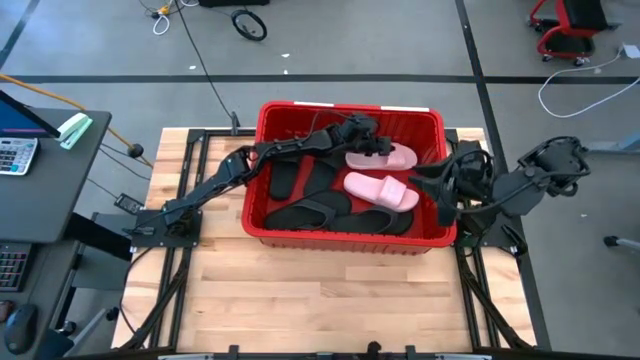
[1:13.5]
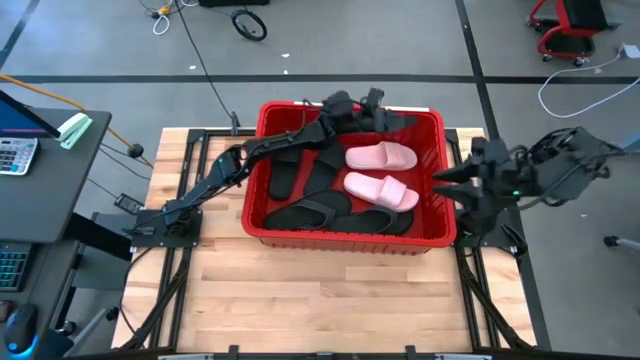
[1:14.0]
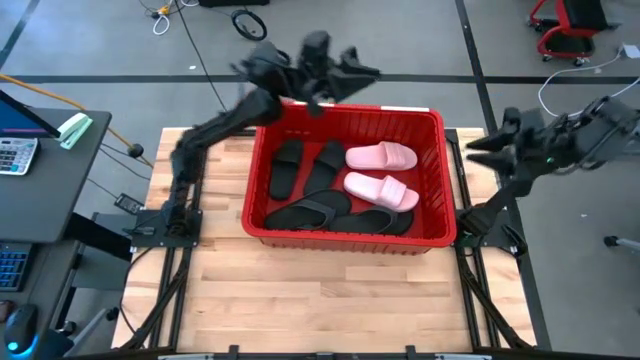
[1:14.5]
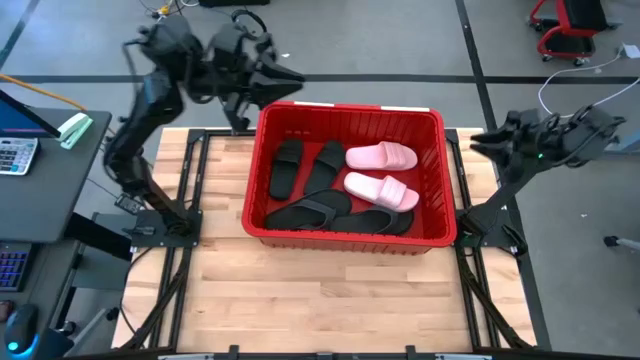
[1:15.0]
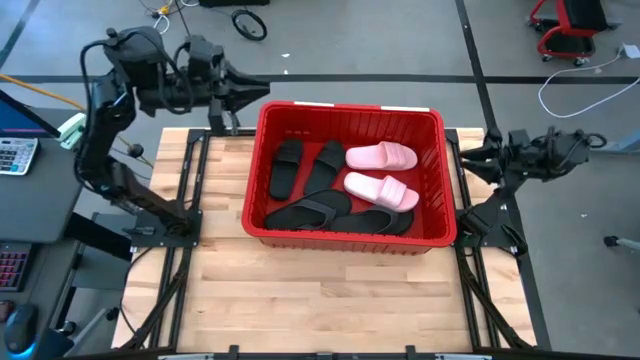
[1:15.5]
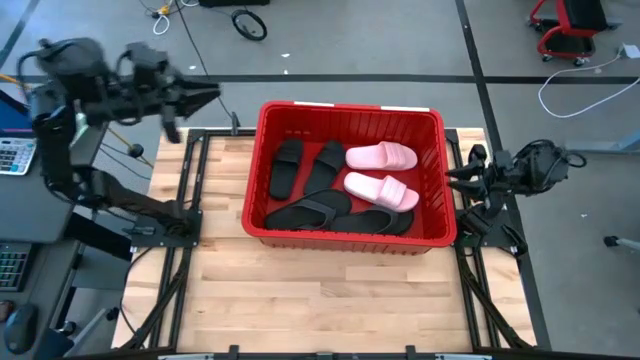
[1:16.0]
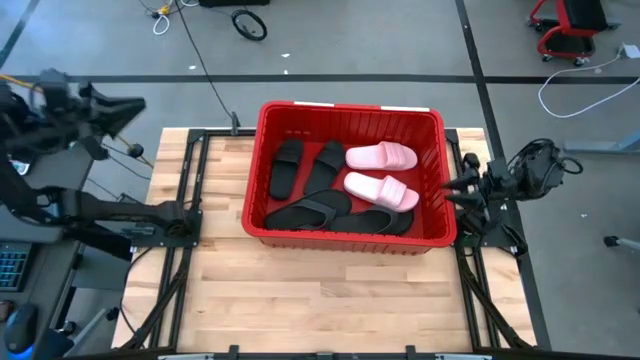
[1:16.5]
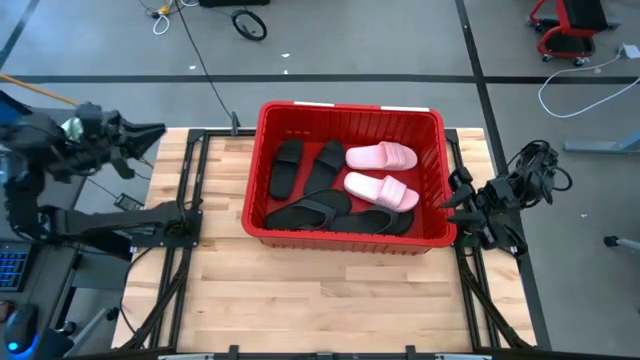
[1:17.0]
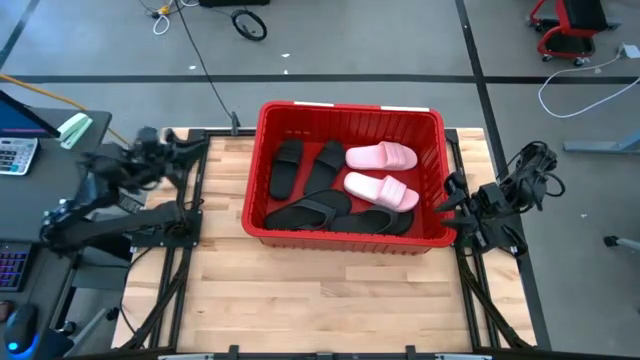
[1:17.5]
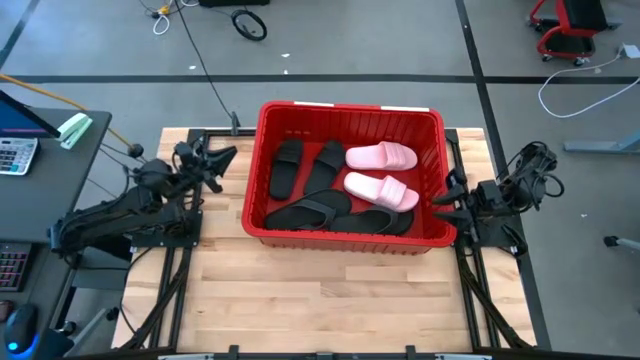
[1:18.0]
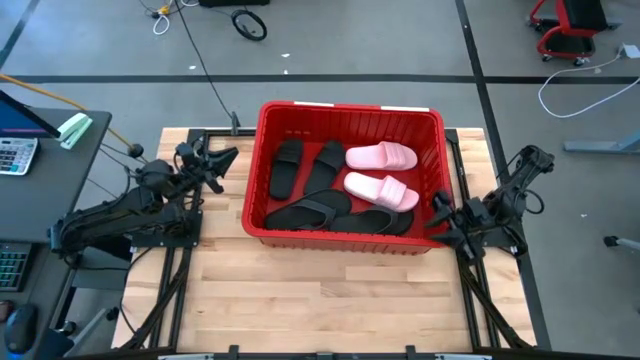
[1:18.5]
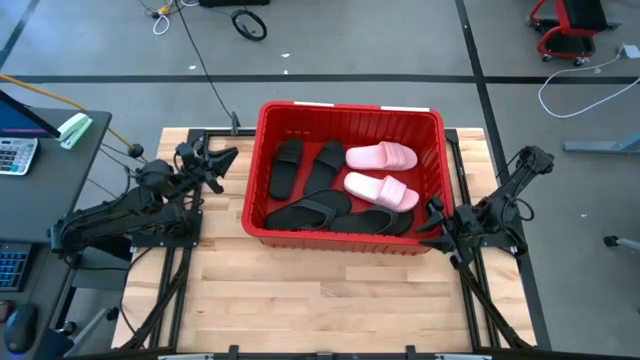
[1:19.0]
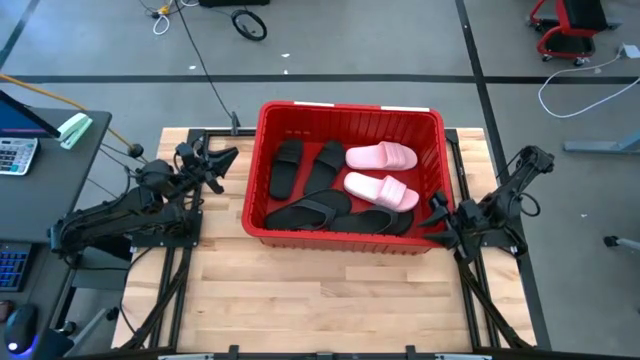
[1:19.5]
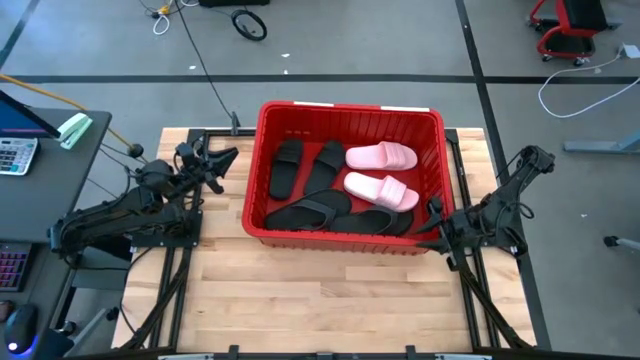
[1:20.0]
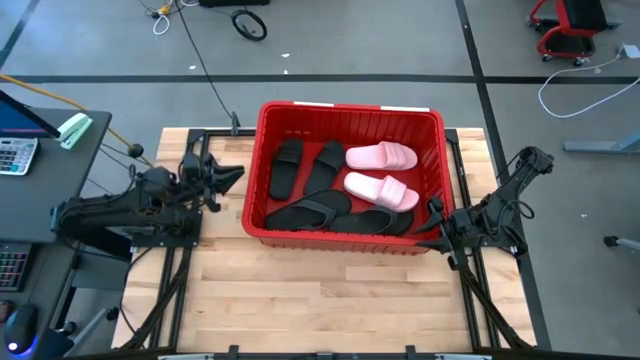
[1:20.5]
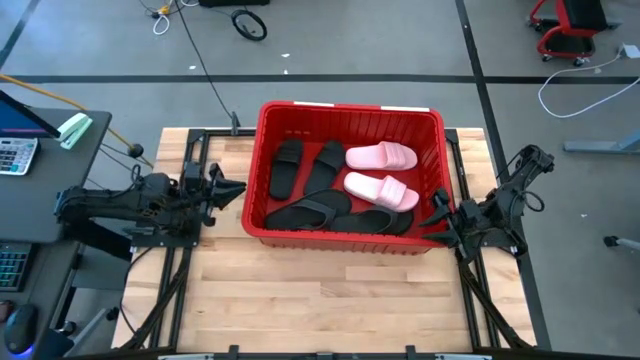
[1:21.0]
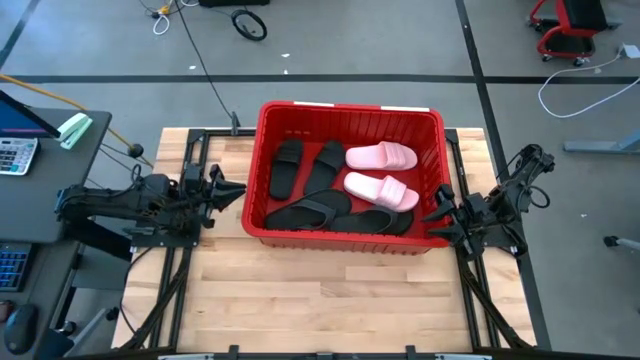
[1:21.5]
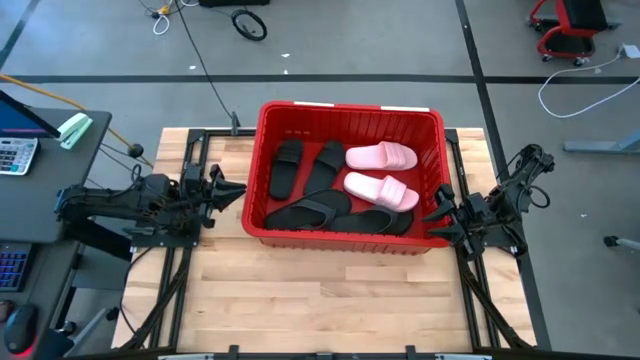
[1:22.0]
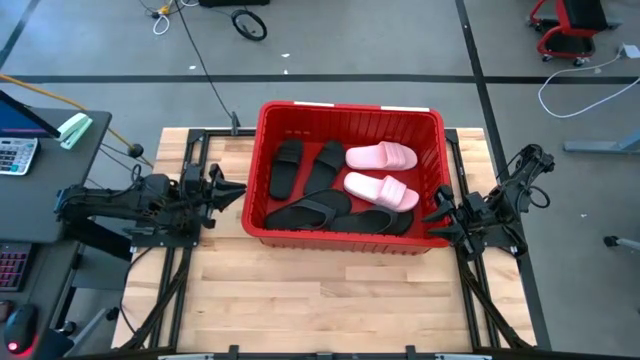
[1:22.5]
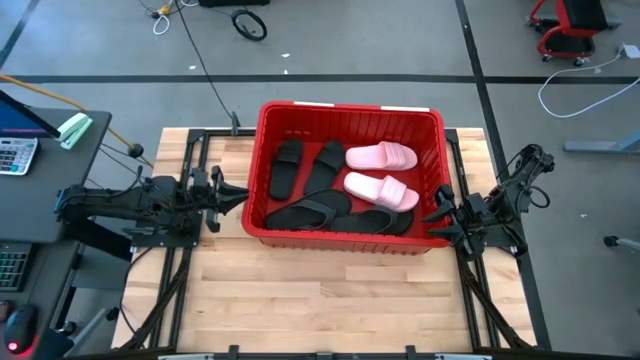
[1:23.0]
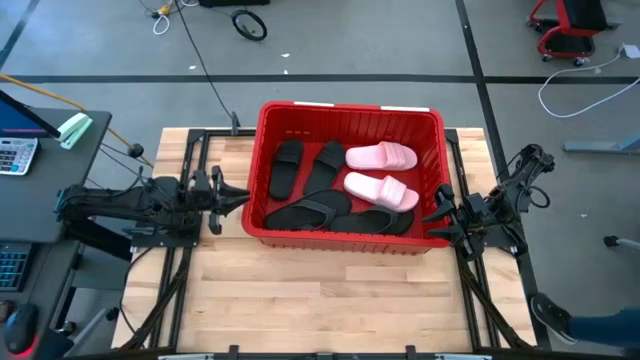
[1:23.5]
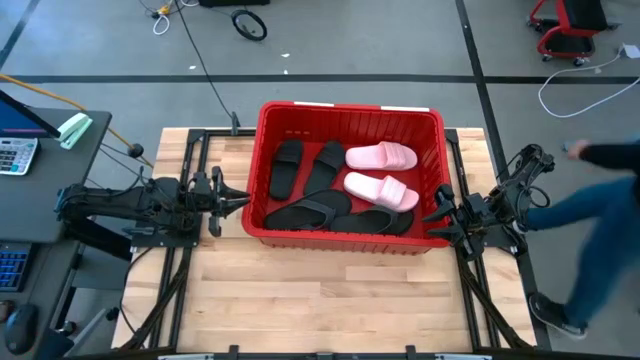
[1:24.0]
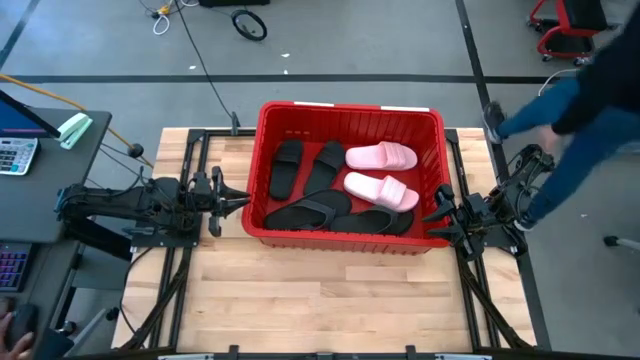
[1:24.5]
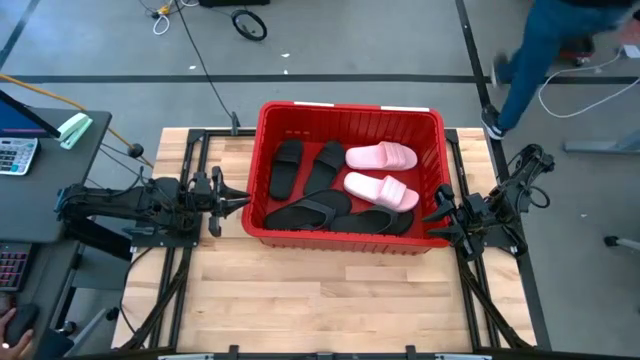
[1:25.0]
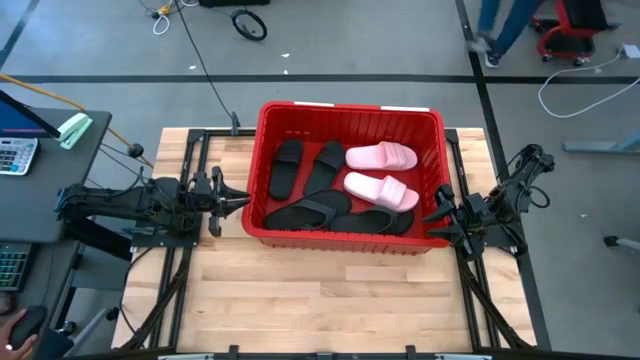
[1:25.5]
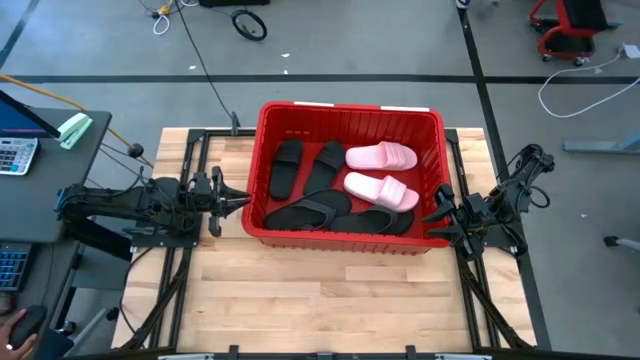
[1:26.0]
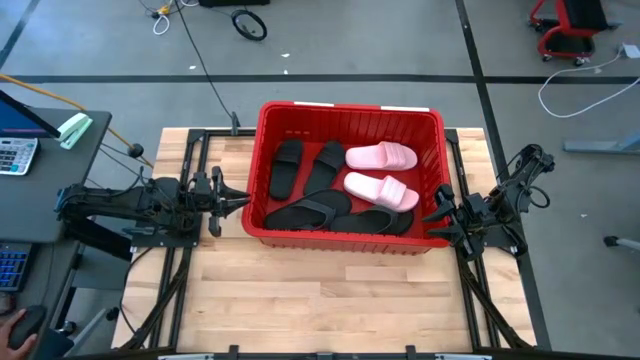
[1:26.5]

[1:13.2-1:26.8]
Task: Pick and place slides into bin
Return to Home Position

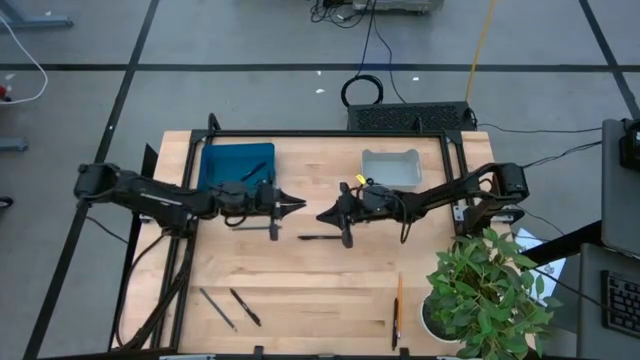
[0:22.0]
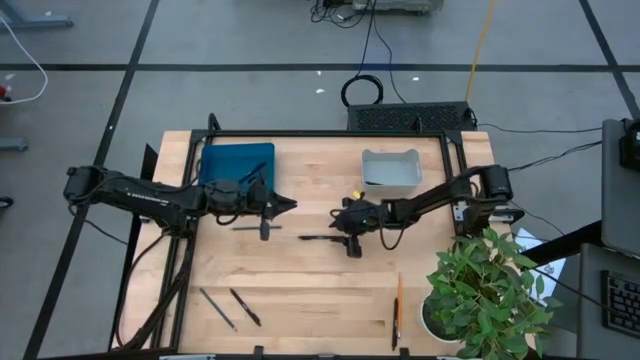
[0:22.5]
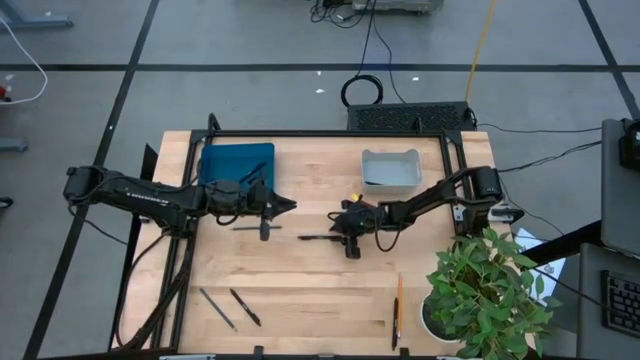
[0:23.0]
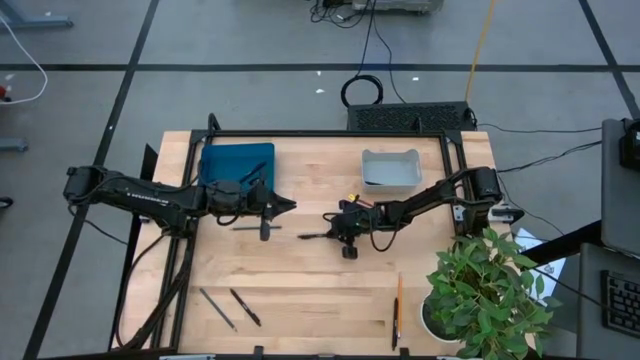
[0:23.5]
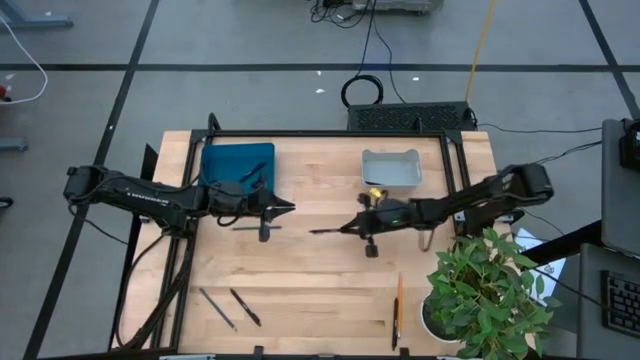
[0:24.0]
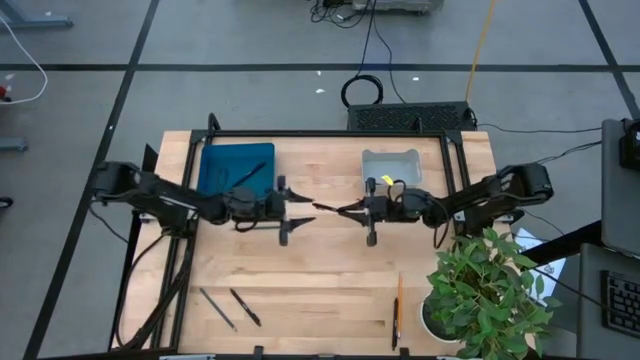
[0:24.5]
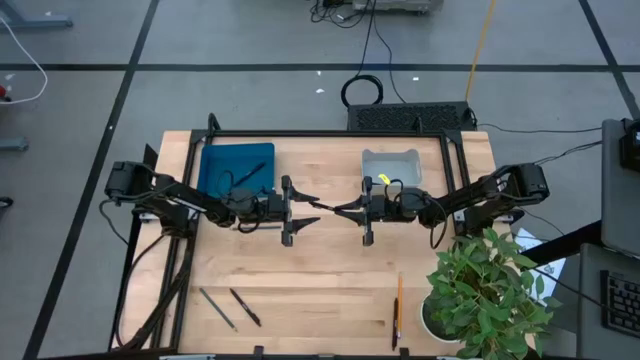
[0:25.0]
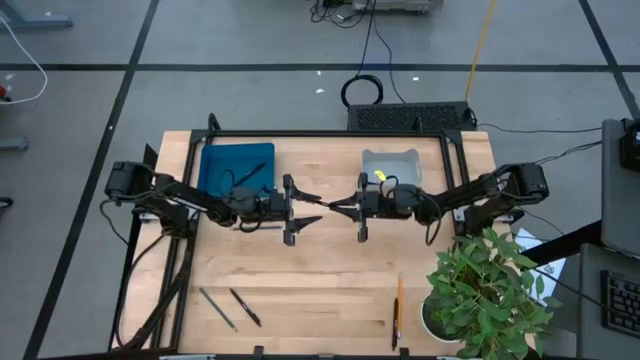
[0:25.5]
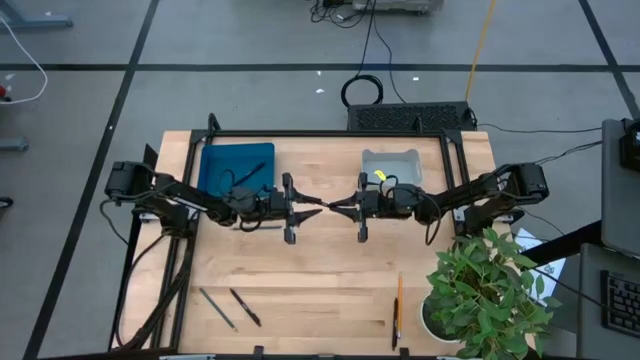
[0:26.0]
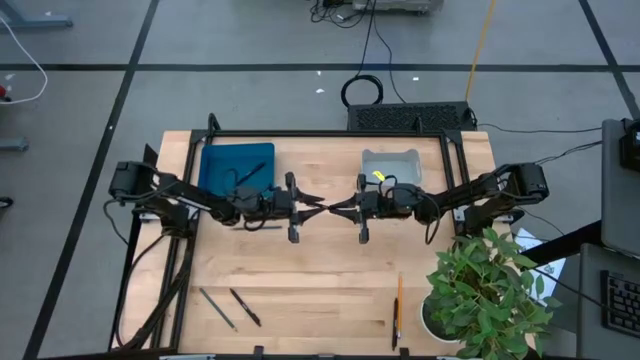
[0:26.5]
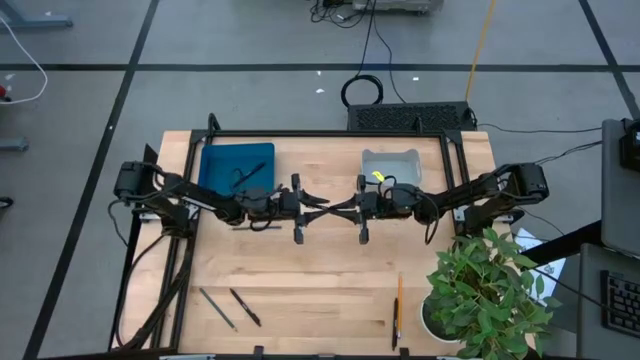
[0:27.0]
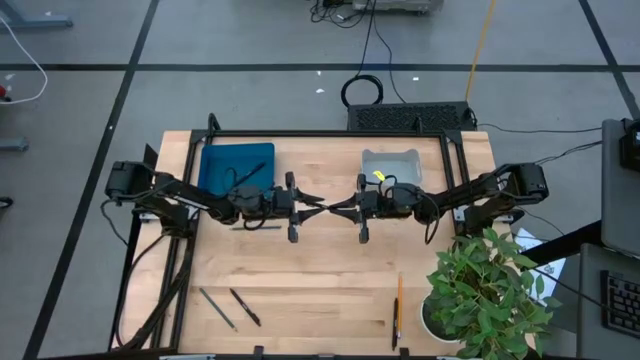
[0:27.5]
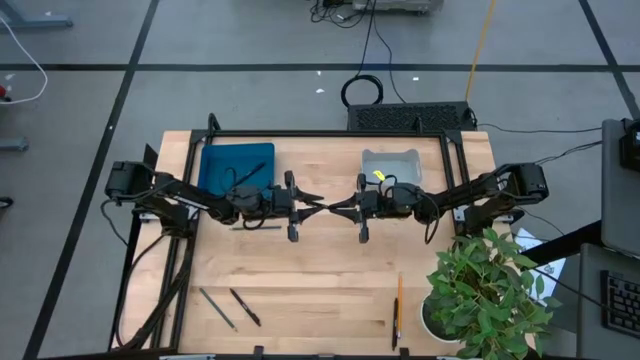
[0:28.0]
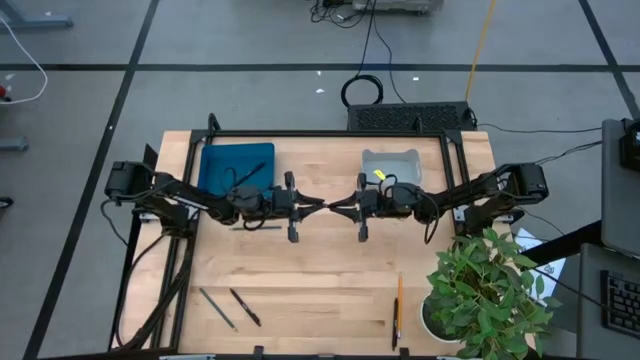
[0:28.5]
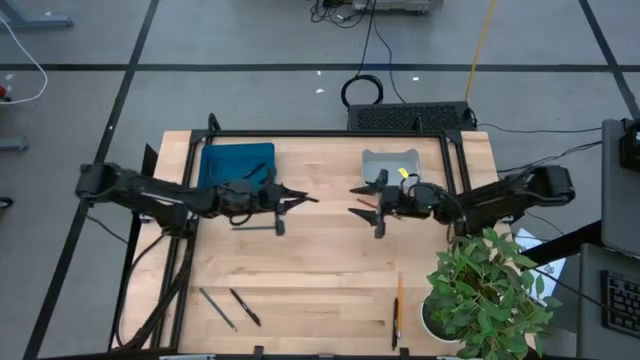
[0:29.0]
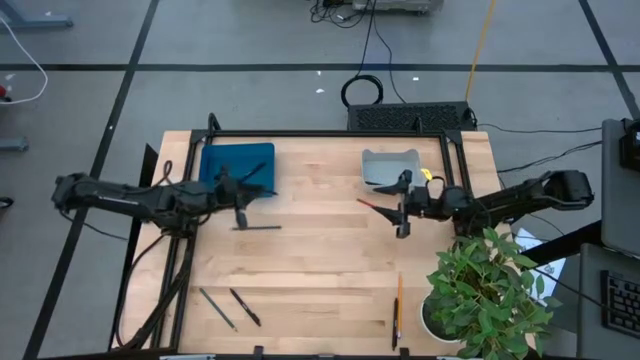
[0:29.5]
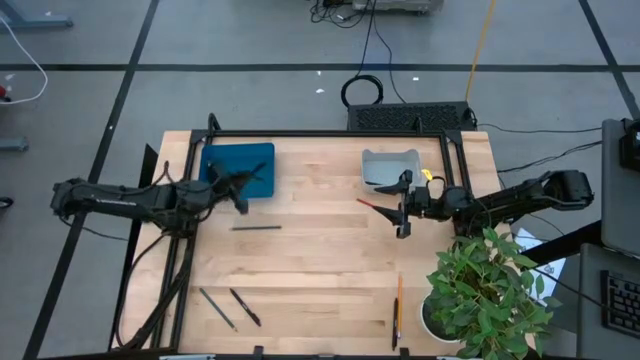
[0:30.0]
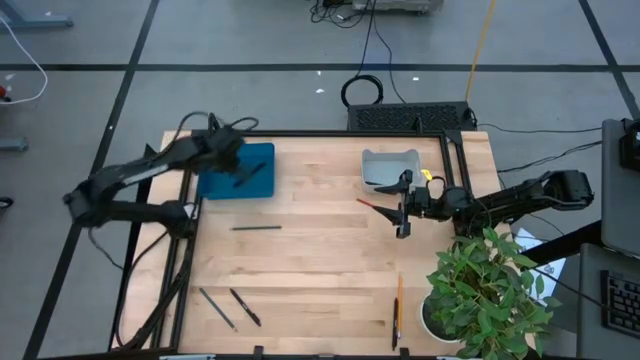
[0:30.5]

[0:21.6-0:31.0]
Task: Sort pens & pencils
Put the black pen into the blue bin
